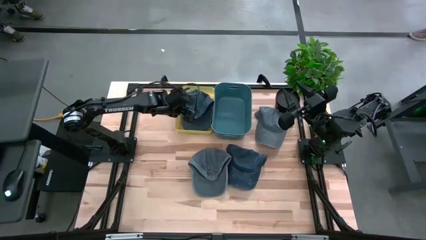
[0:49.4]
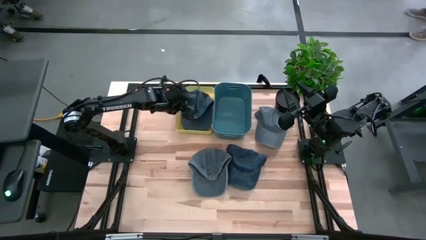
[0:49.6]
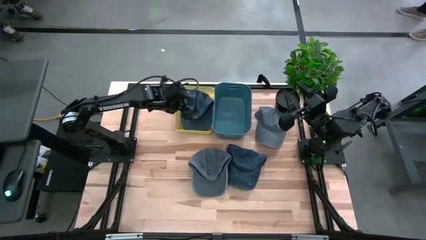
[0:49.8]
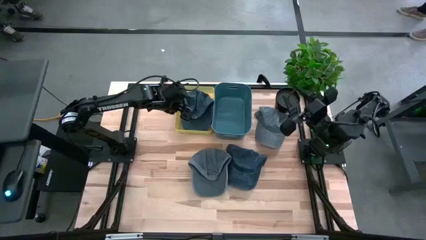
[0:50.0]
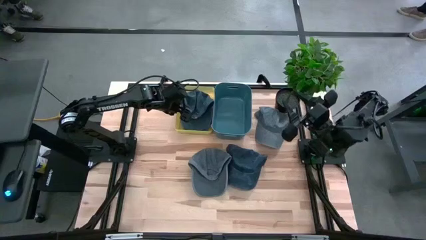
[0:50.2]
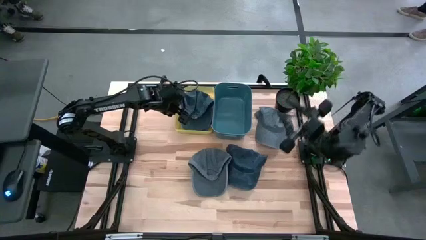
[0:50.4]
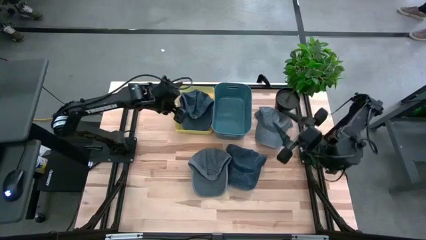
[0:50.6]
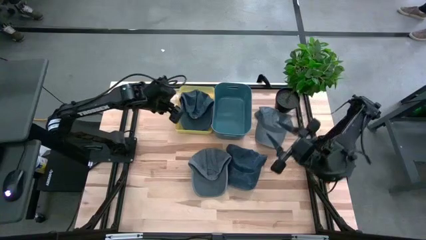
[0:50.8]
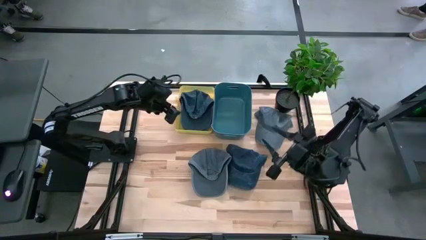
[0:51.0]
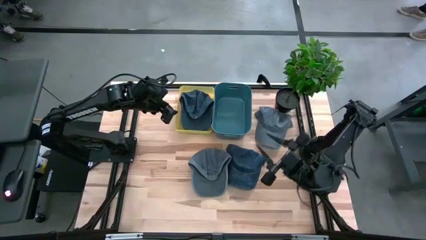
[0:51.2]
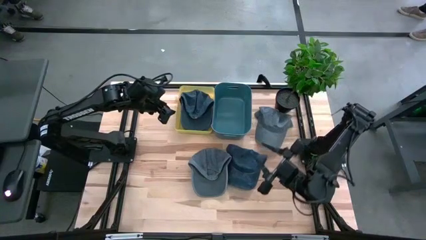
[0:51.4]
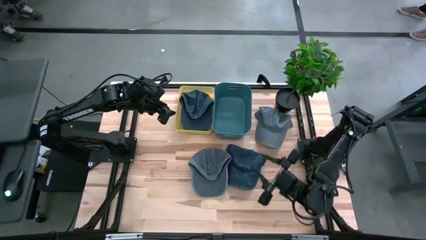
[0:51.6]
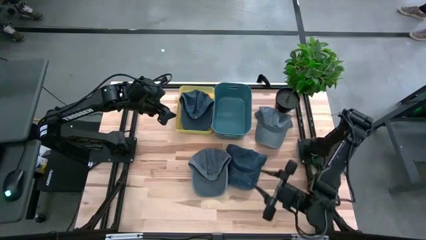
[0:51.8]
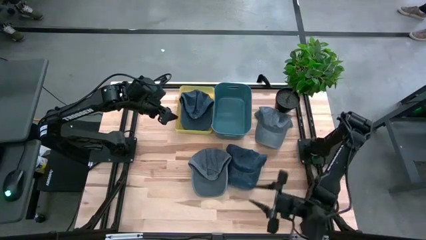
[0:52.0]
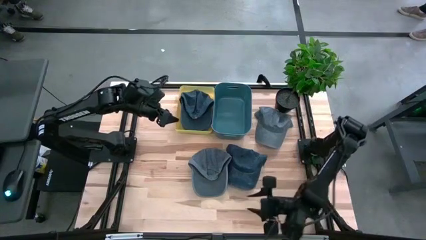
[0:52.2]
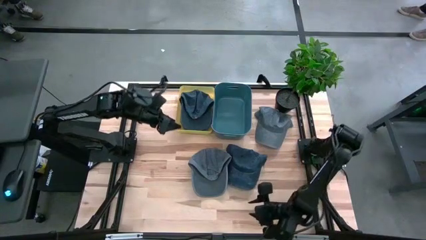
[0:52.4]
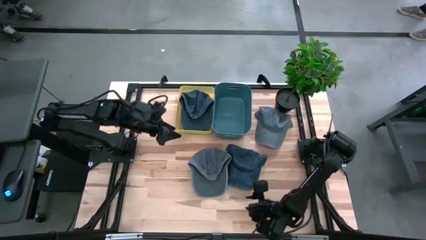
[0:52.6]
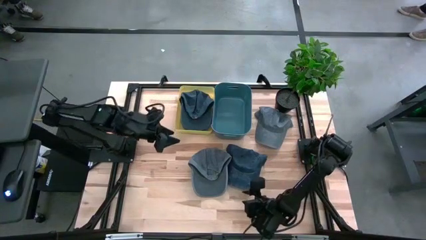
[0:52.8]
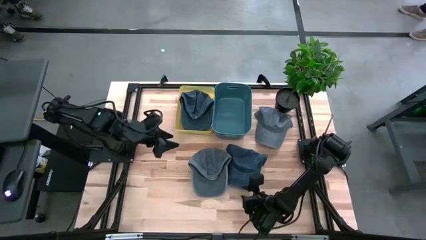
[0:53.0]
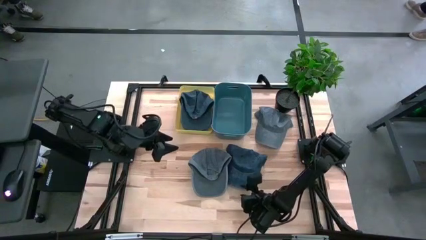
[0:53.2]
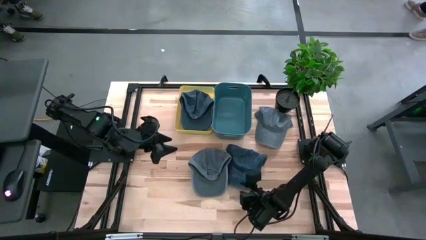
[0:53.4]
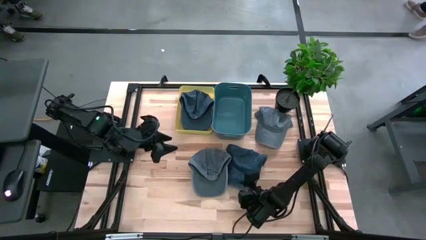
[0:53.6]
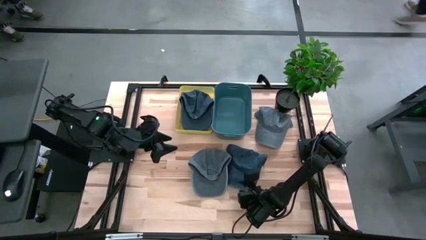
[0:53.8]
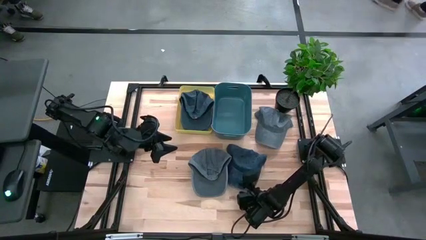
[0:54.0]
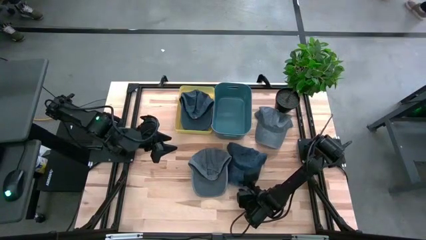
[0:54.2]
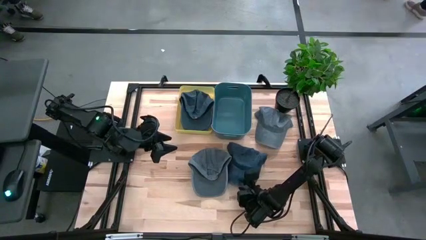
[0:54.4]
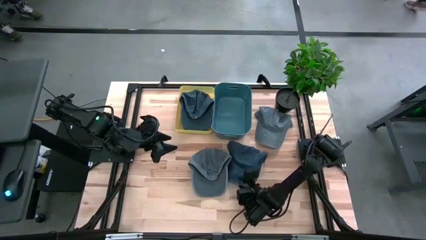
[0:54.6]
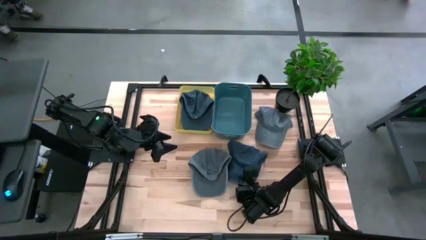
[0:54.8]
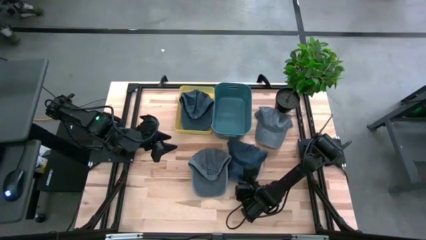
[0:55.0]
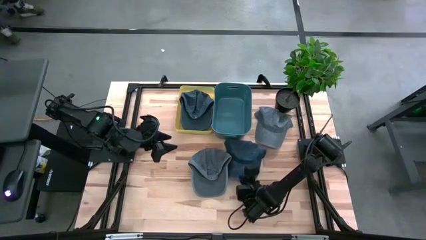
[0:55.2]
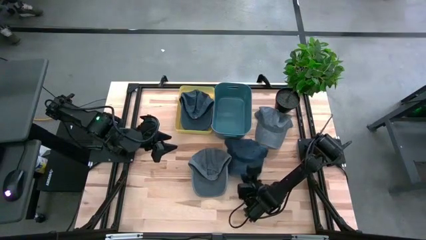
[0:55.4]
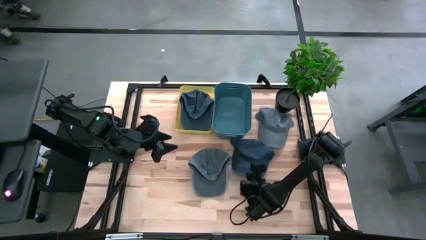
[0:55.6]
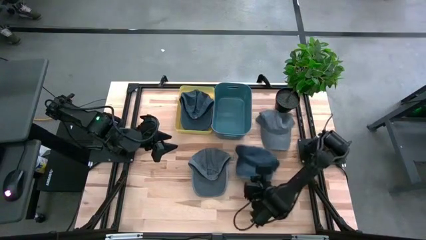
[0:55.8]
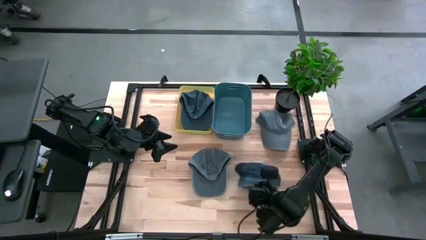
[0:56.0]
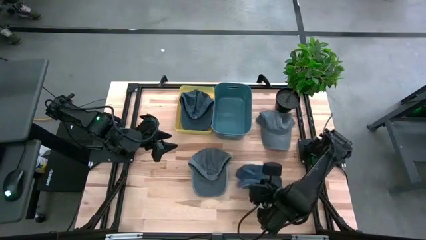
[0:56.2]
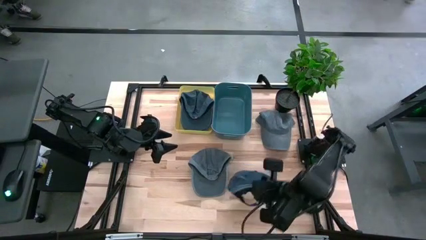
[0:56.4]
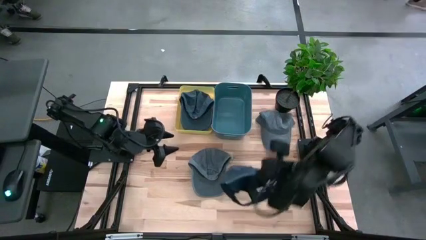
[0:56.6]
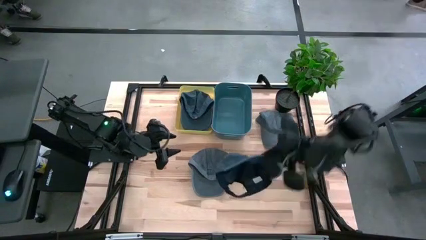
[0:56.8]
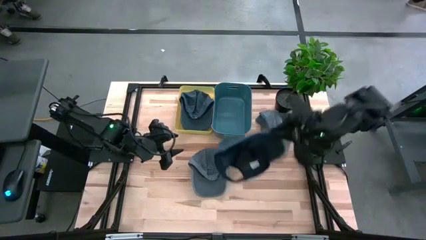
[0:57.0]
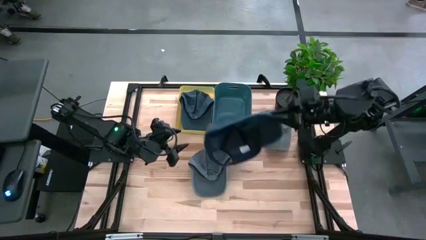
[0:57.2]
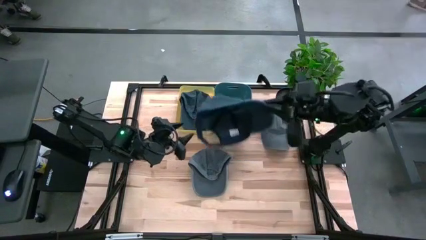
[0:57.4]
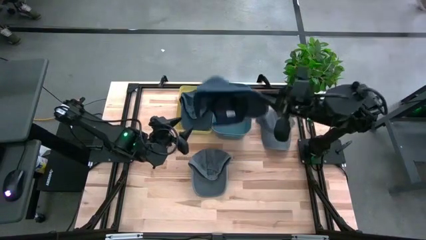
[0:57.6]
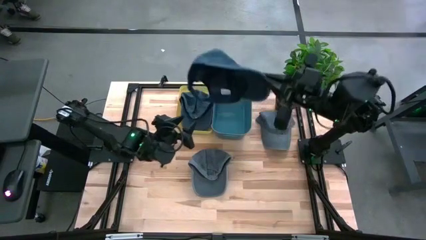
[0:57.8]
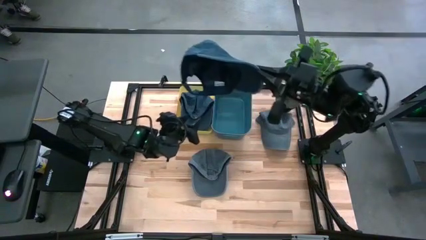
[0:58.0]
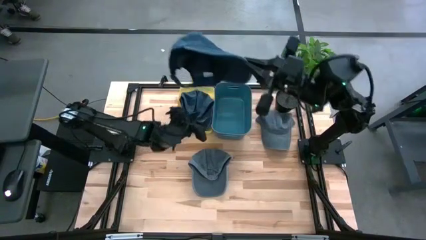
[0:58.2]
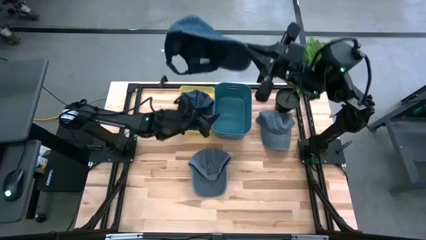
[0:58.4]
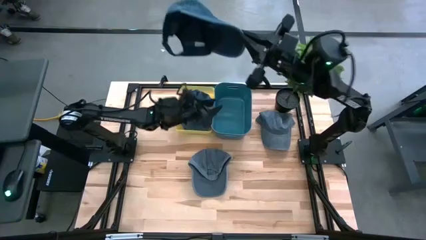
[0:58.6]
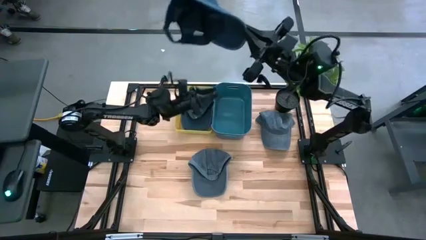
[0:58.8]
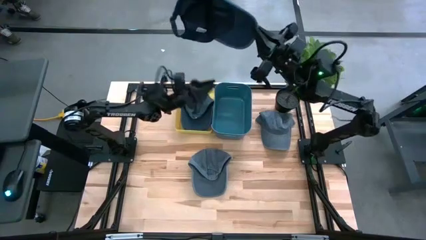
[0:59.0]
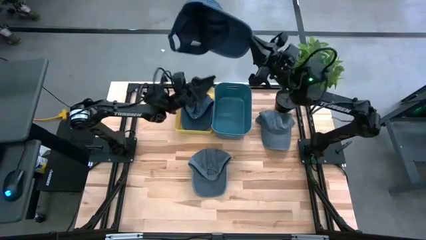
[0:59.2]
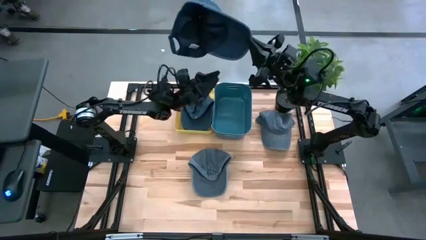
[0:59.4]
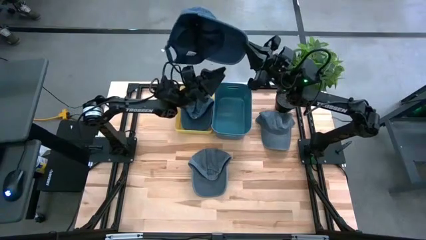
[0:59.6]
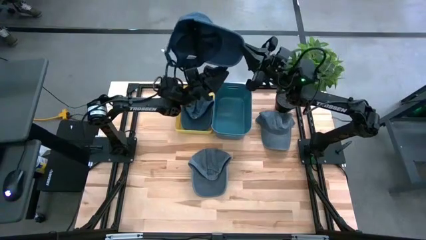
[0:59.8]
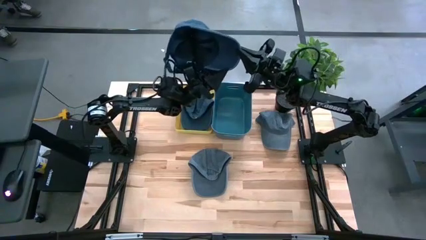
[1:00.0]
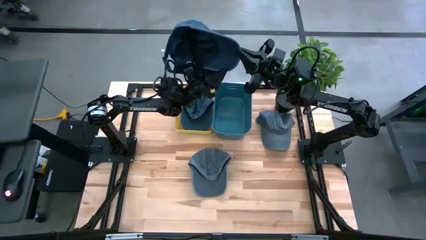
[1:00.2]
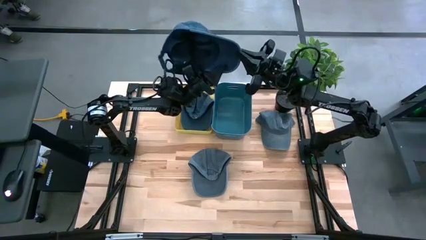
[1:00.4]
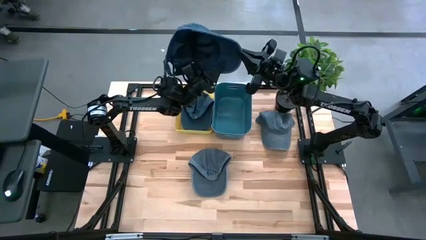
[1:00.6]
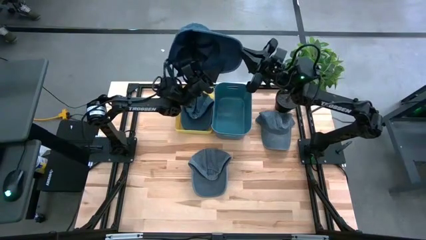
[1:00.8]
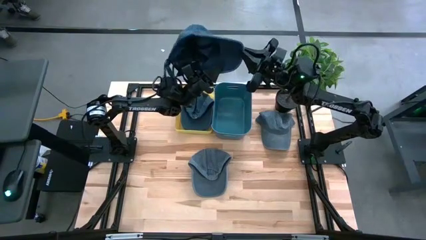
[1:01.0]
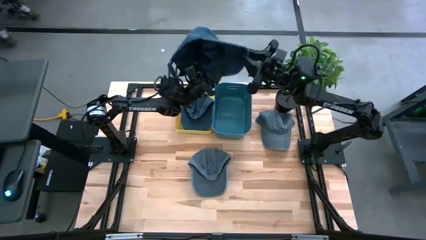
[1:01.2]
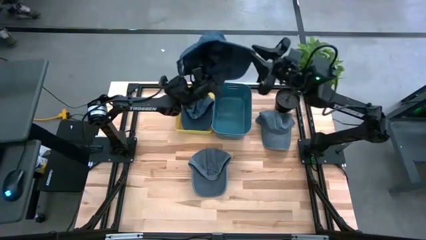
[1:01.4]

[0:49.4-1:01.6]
Task: Pick & Place hat
Put the blue cap into the yellow bin
